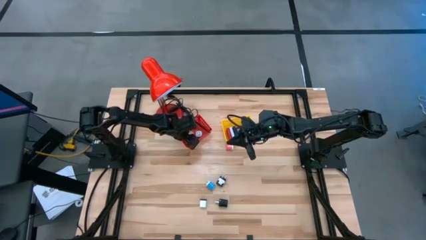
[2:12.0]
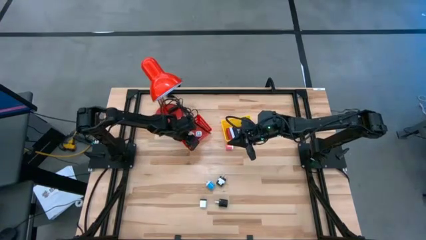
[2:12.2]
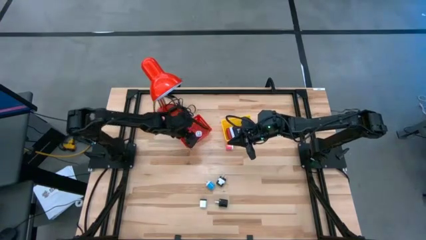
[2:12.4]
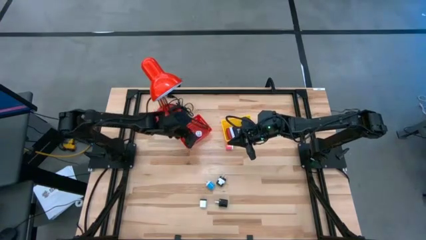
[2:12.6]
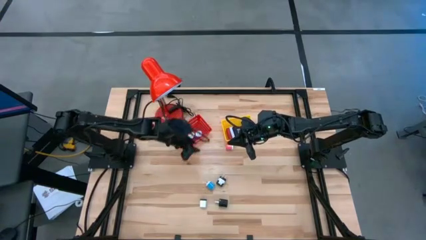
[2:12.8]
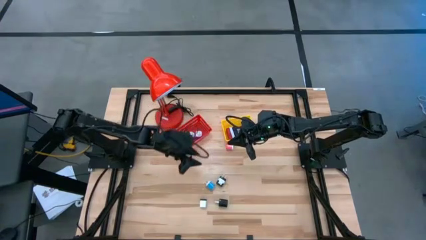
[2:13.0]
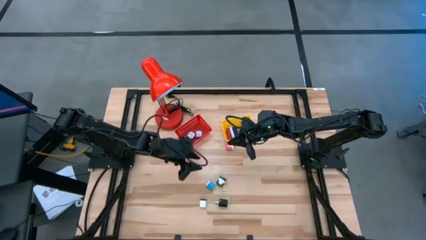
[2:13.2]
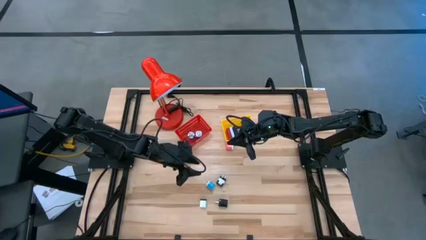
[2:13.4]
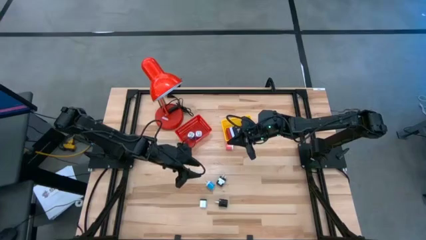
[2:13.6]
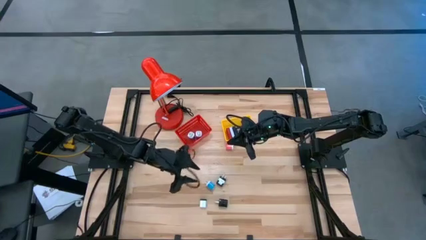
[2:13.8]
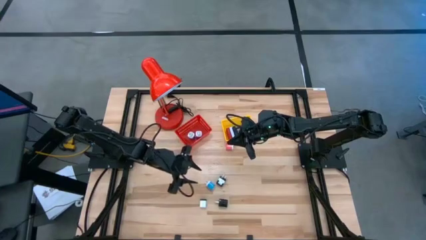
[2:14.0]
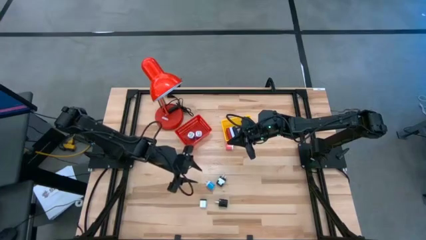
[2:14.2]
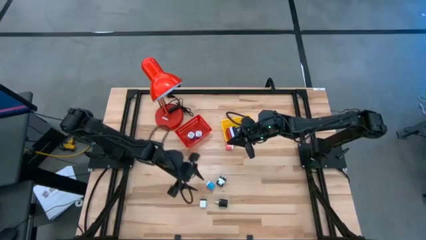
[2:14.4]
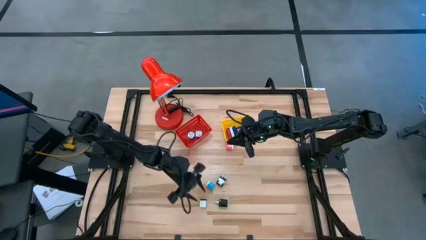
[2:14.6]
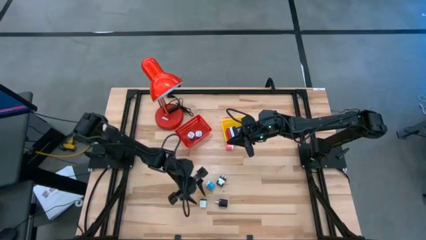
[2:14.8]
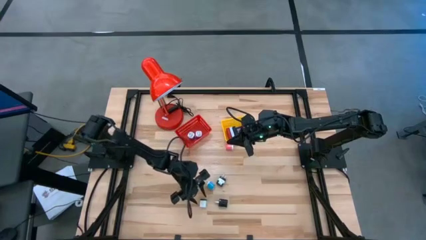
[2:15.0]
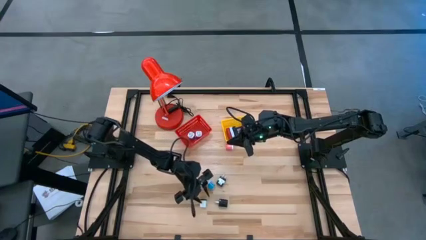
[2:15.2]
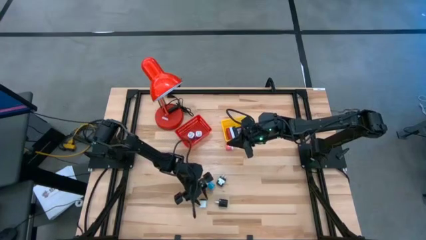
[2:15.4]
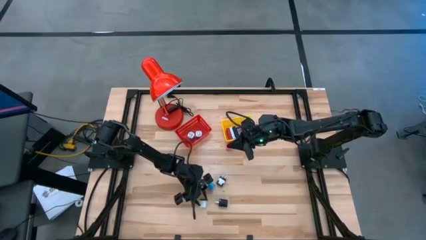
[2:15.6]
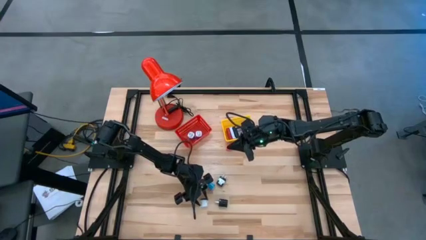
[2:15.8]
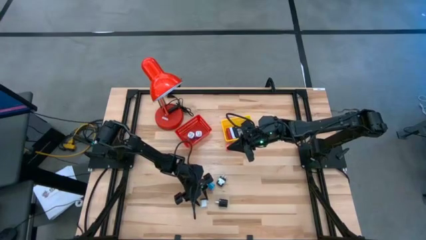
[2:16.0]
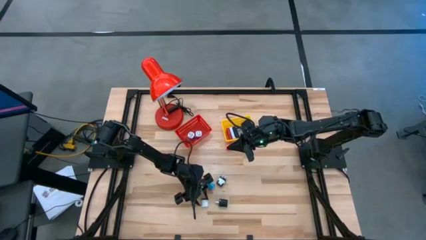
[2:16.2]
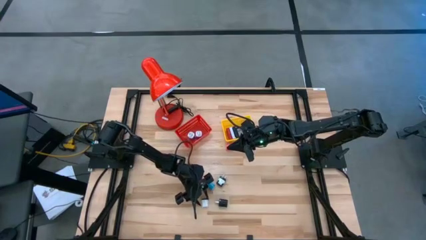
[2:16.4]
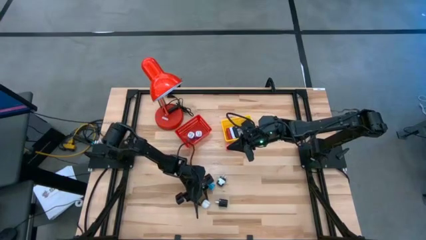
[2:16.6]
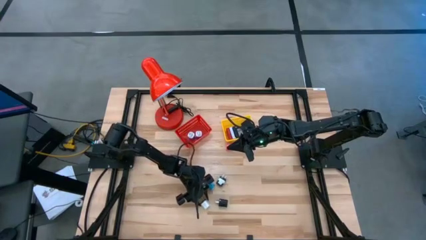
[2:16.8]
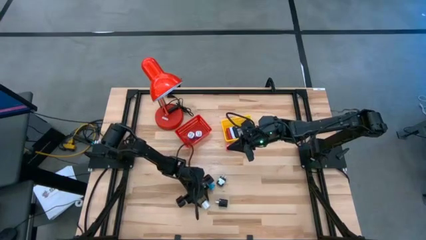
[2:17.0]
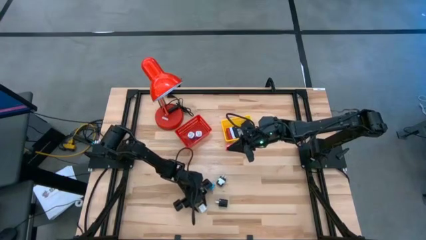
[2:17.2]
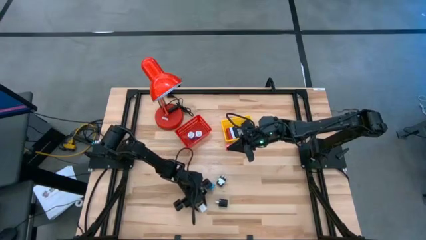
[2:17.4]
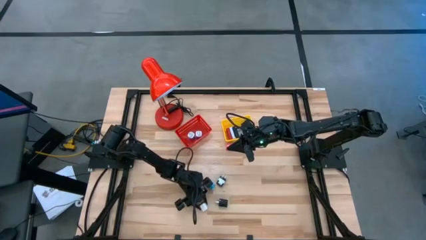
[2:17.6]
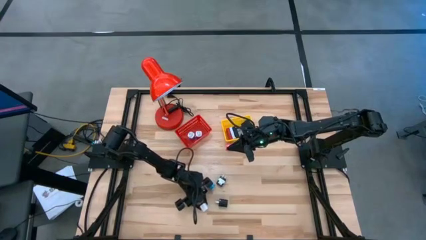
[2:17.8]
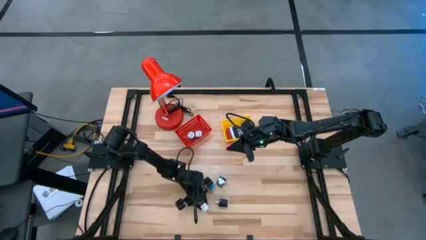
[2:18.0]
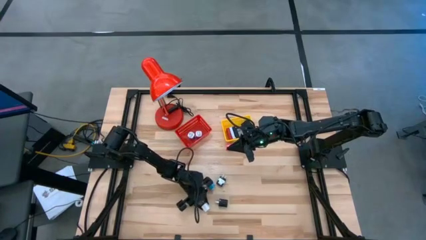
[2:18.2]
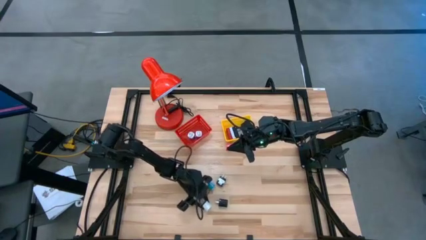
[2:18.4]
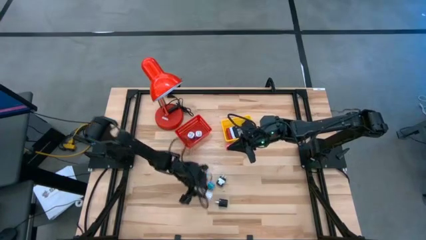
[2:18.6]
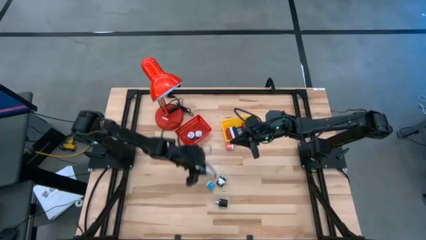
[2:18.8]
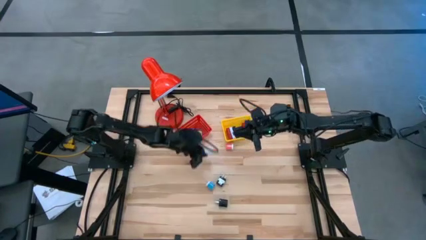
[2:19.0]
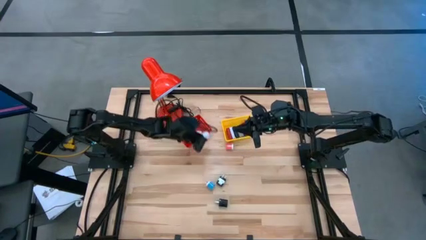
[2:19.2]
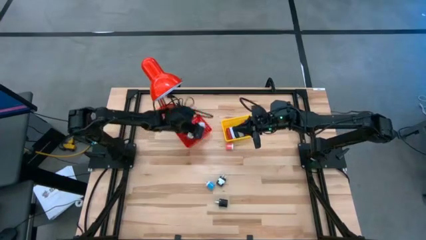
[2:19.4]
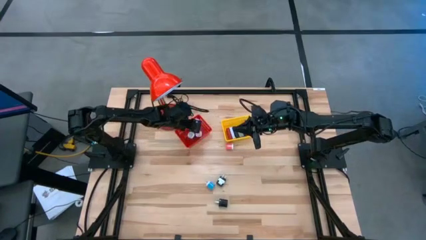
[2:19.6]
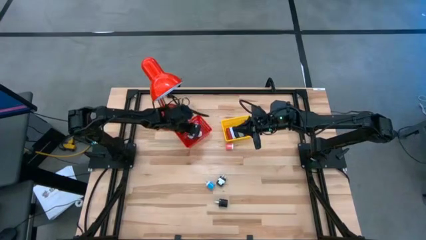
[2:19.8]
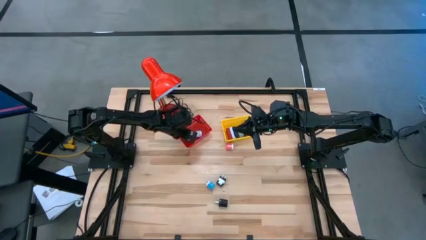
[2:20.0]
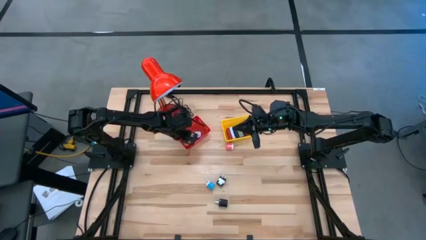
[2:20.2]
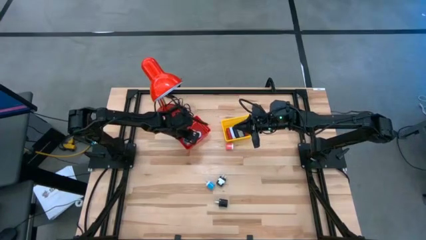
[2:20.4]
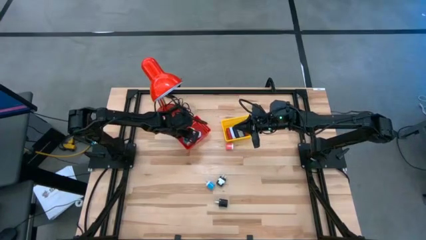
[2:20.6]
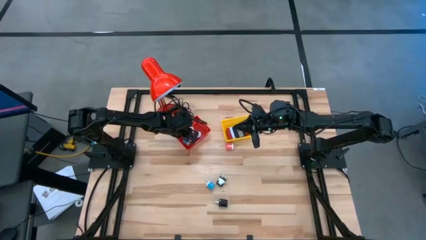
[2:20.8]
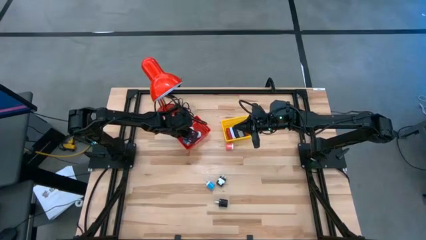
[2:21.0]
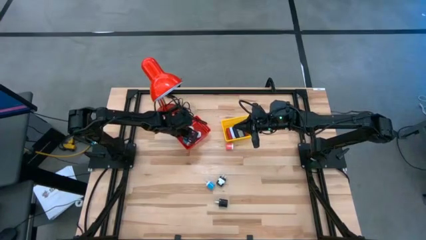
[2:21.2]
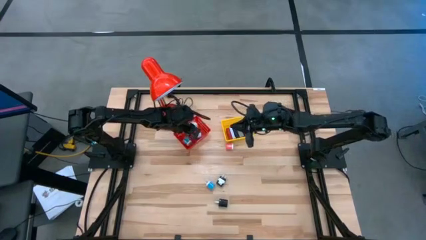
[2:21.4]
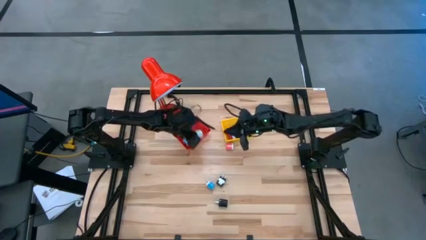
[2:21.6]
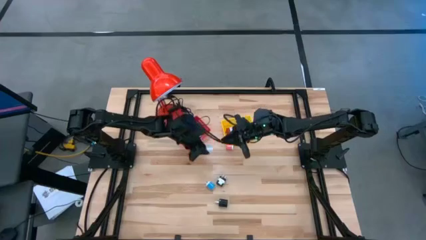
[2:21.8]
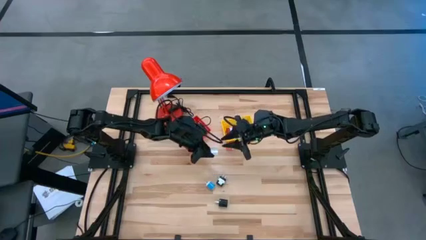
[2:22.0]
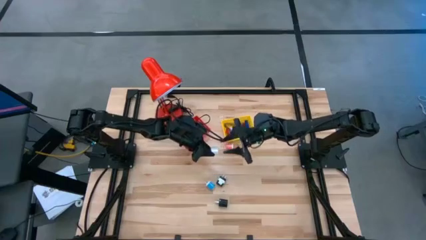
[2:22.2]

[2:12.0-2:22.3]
Task: Pick & Place Office items
Put the white charger adapter into the red bin
